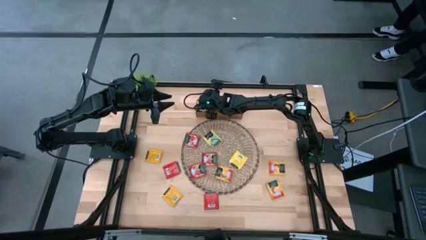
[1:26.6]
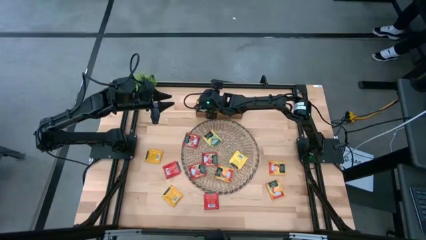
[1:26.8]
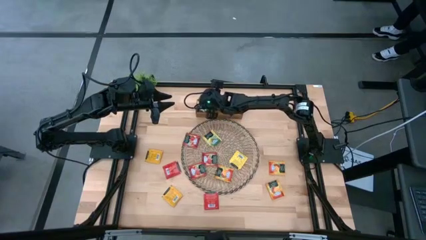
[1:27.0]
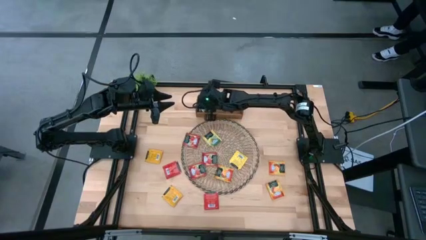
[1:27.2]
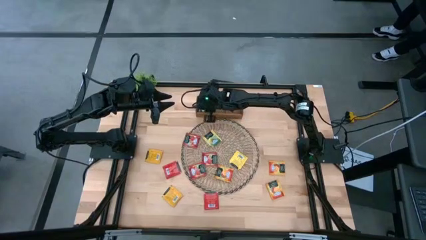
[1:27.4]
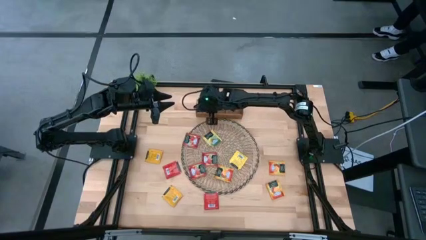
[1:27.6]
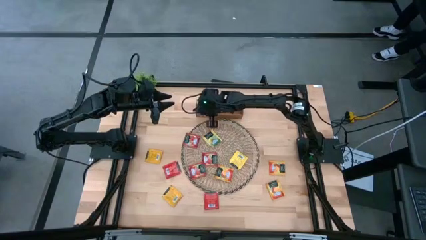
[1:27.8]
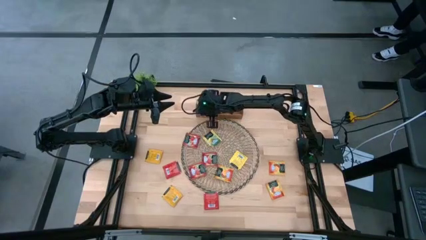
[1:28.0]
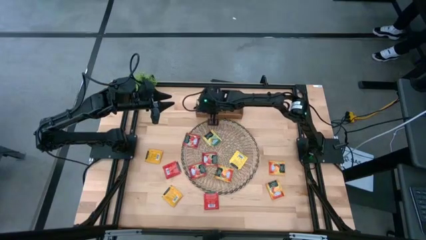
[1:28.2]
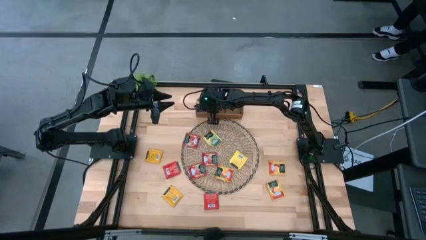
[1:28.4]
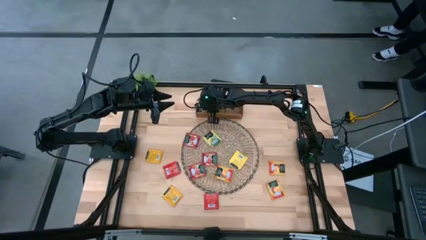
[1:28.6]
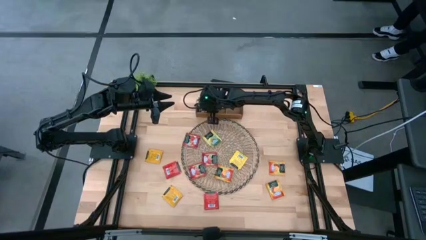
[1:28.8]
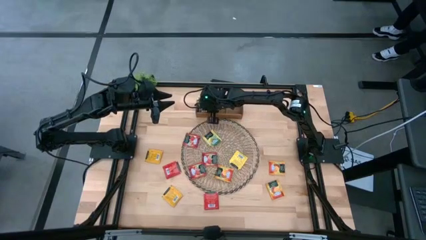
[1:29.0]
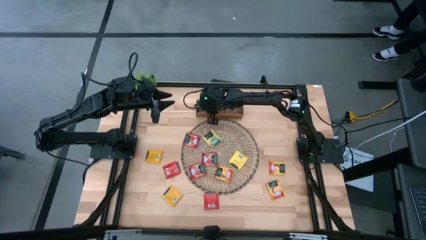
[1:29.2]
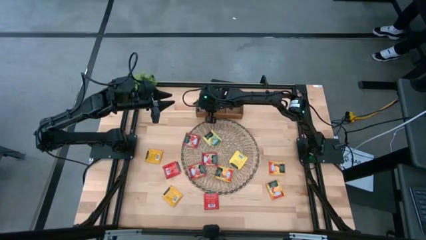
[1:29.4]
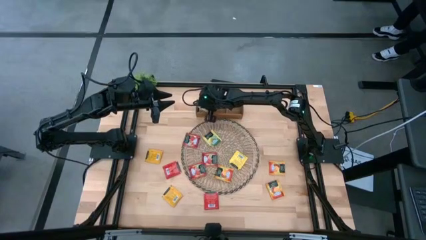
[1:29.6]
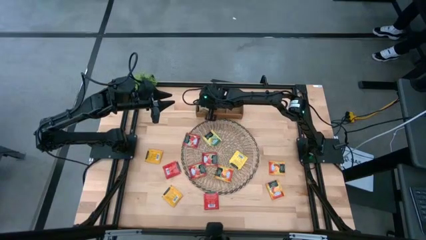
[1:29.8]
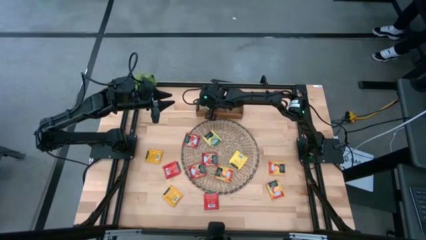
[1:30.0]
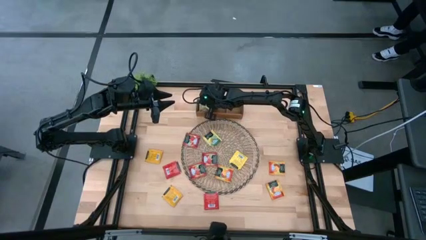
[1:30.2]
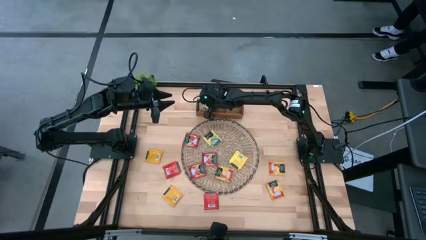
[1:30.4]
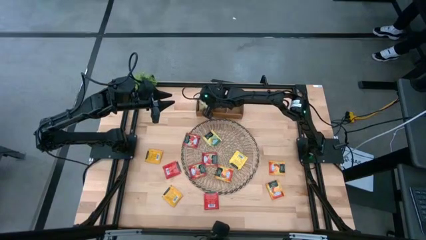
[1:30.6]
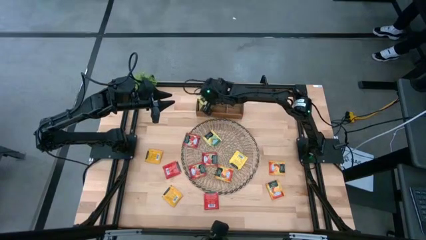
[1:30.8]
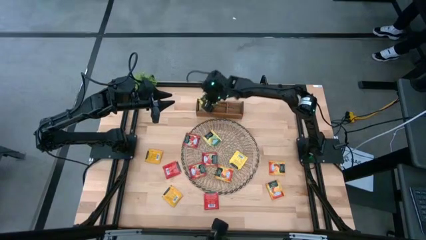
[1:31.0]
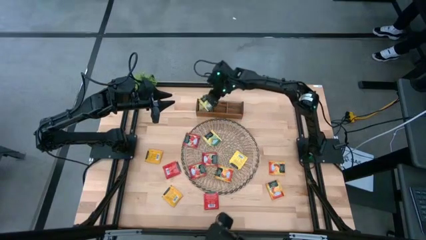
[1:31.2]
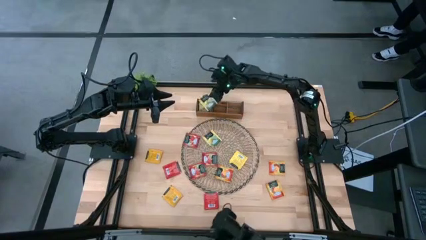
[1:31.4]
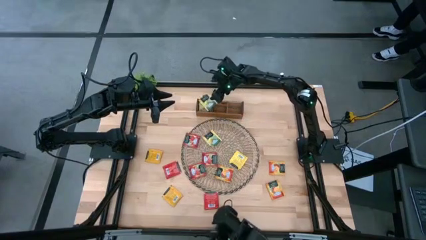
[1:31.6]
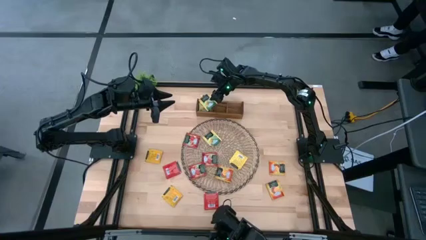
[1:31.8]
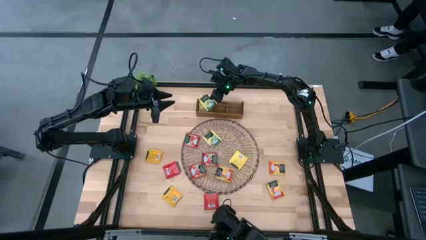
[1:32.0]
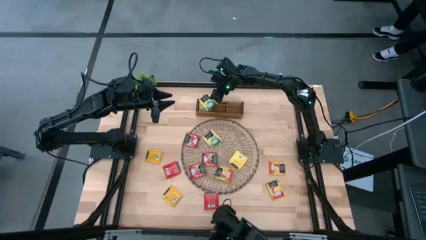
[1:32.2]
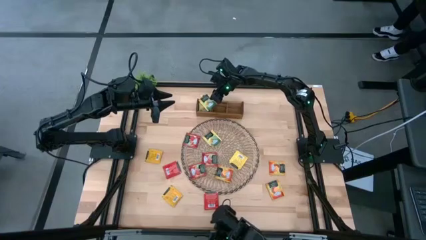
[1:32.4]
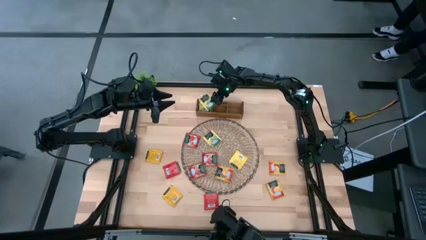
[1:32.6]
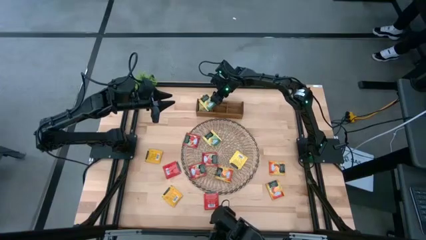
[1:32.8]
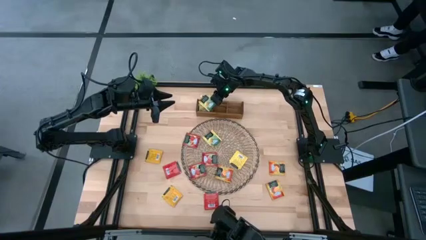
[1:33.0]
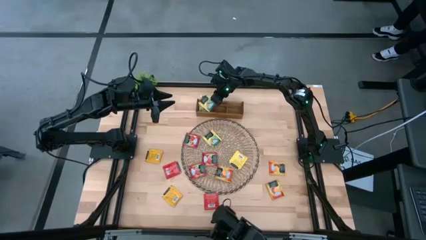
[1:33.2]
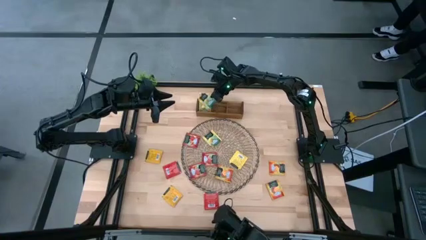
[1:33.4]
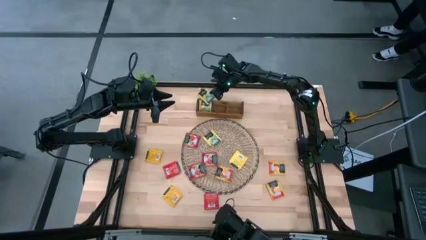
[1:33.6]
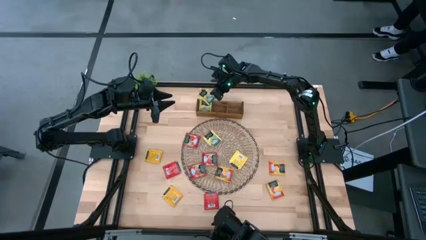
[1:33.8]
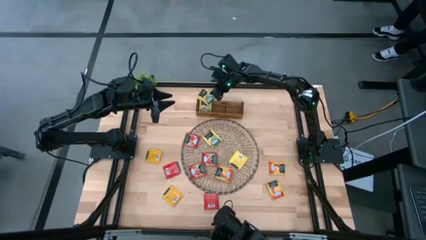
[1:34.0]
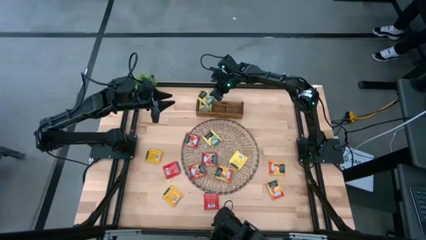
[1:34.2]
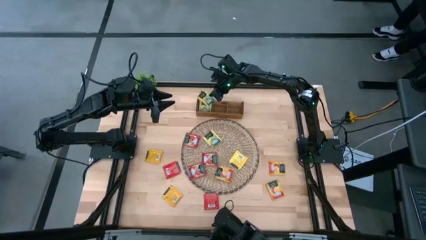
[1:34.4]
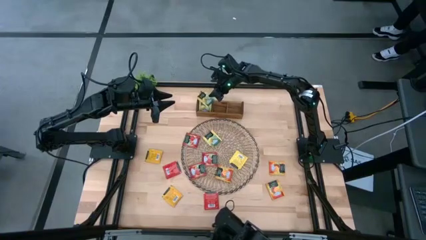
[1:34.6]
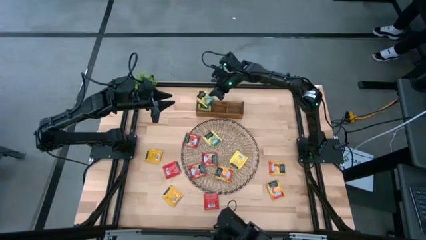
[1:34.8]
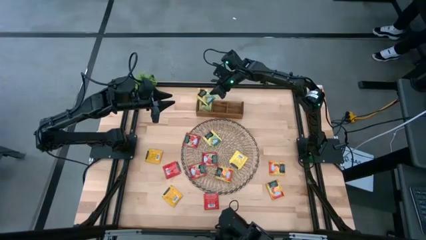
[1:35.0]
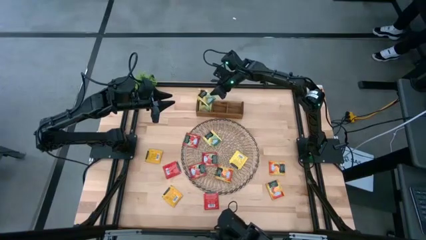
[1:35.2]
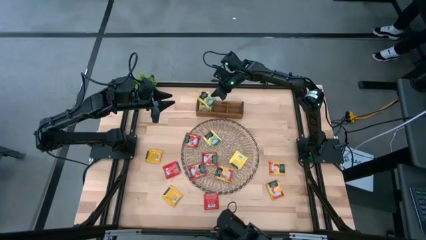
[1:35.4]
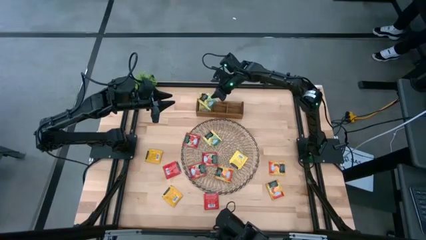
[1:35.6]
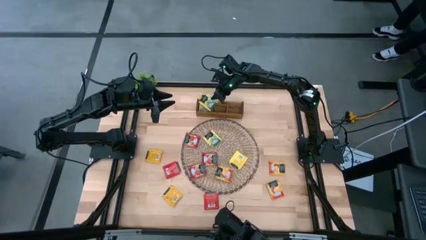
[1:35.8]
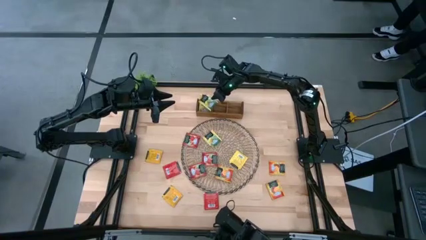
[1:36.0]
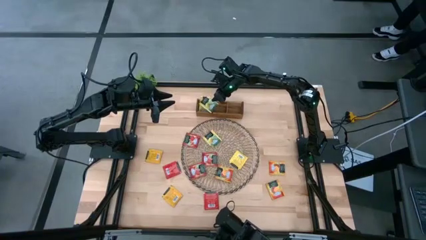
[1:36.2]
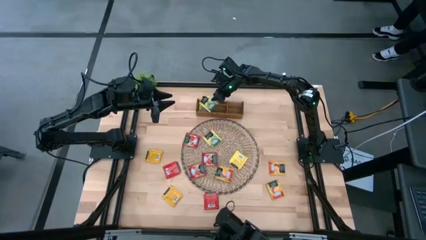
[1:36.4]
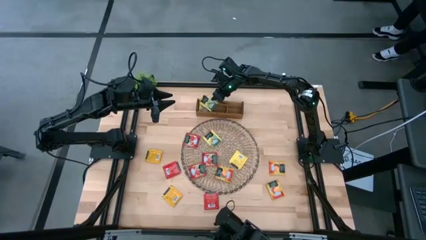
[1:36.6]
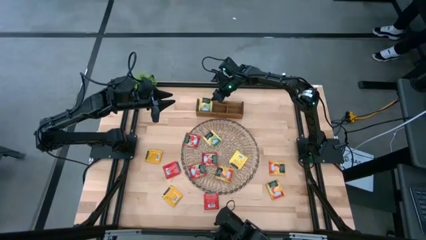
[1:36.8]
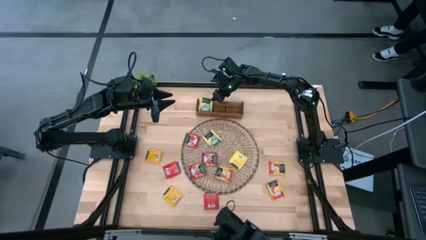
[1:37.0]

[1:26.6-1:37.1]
Task: Pick & Place Tea
Put the middle yellow tea bag into the left of the wooden organizer
